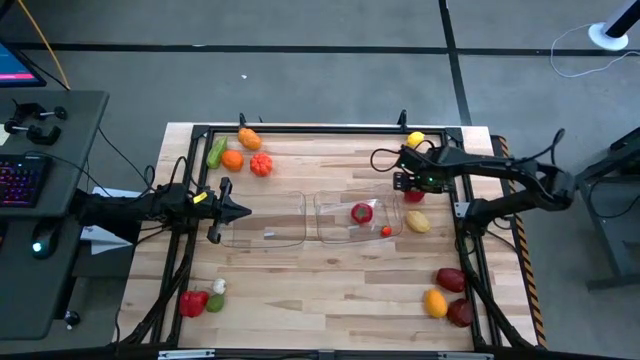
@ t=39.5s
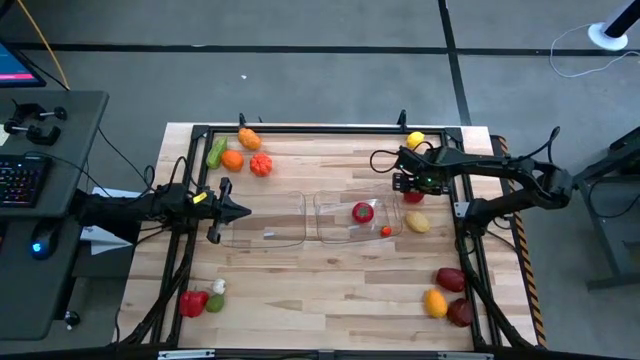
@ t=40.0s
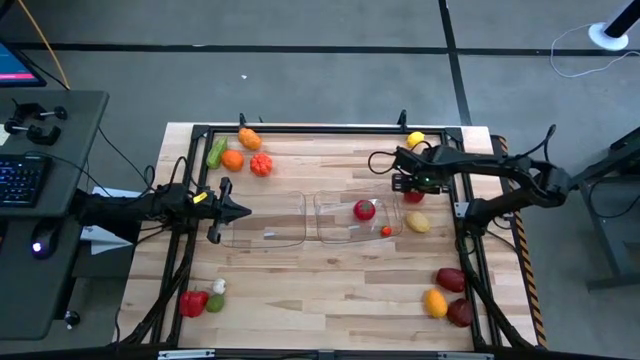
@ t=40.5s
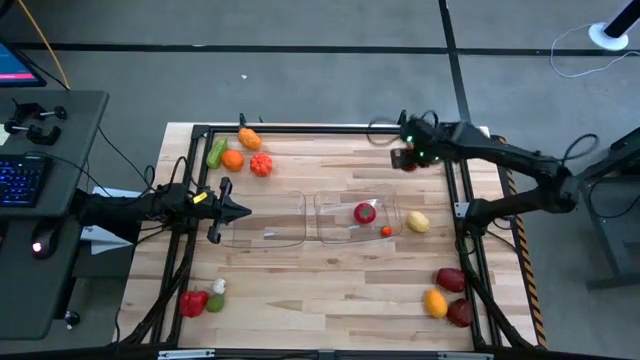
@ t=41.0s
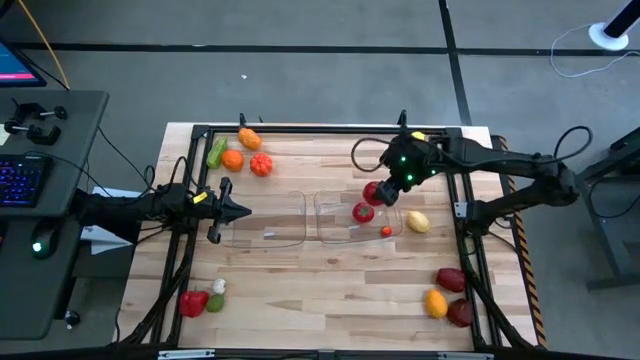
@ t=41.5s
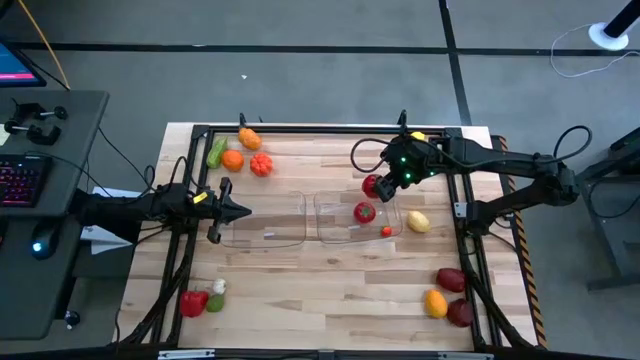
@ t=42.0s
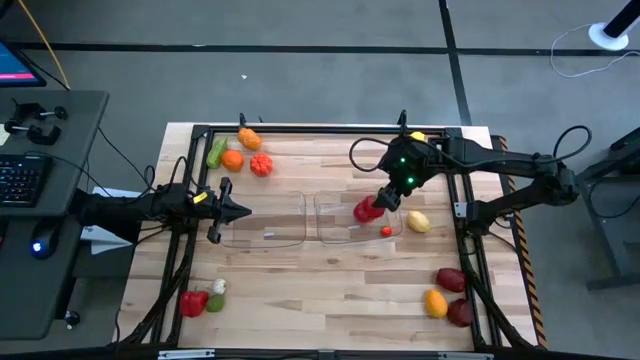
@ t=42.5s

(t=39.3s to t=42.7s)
Task: Sort produce into baskets
Put the red tomato into the right transparent bin

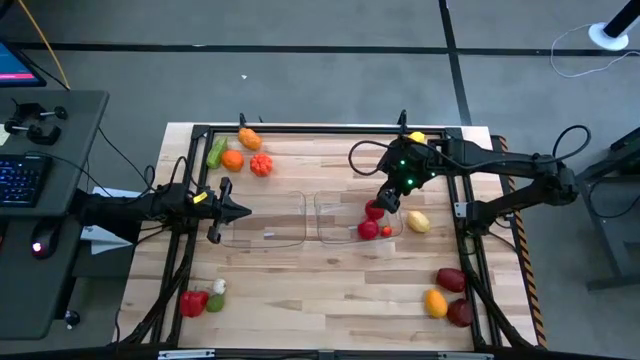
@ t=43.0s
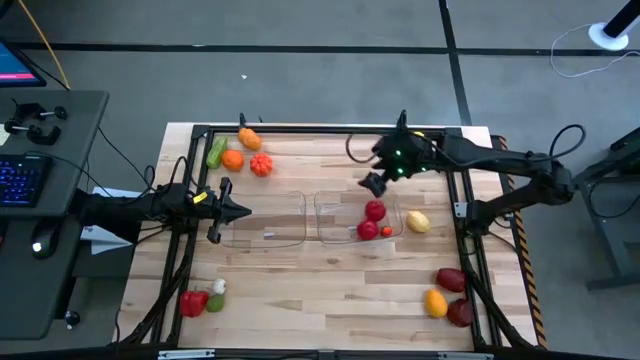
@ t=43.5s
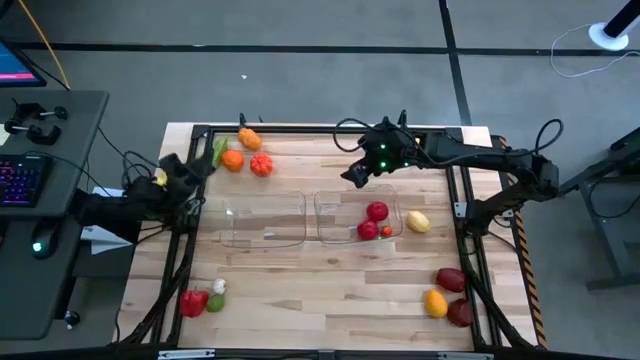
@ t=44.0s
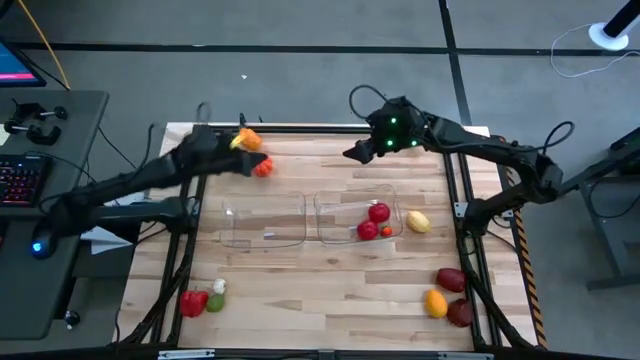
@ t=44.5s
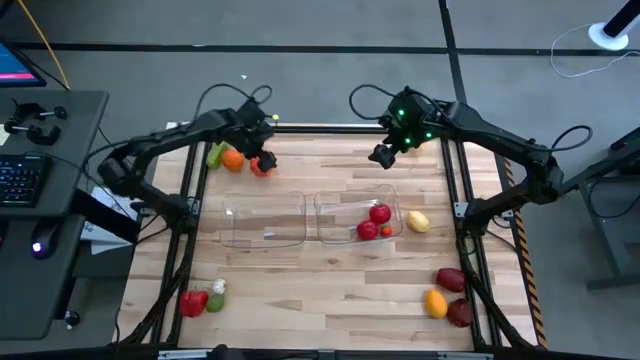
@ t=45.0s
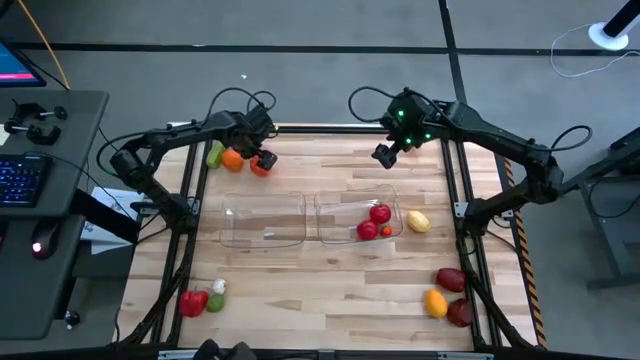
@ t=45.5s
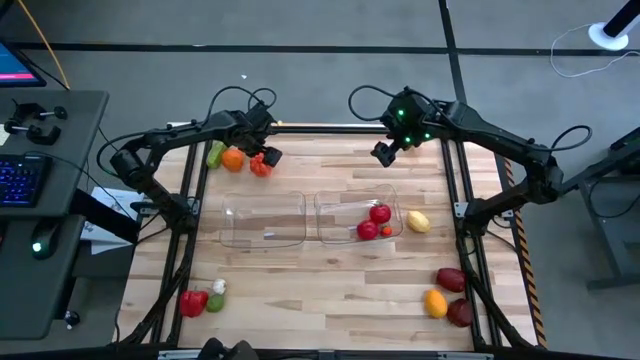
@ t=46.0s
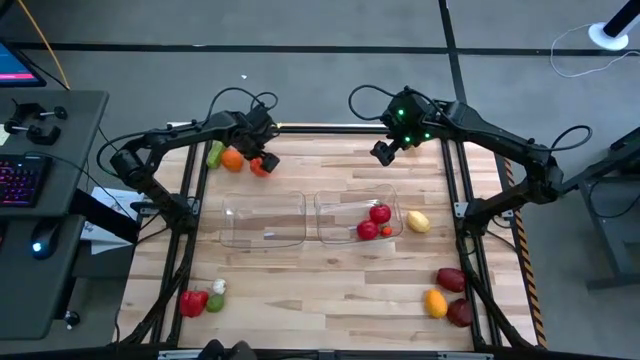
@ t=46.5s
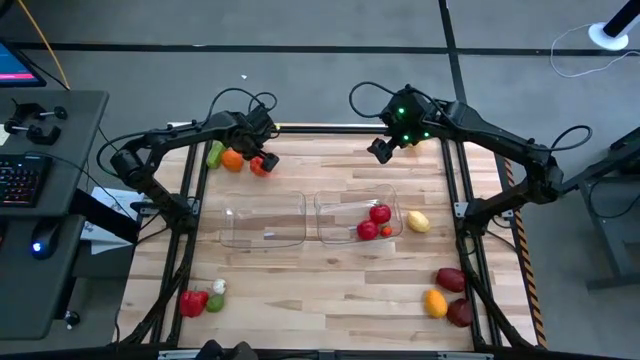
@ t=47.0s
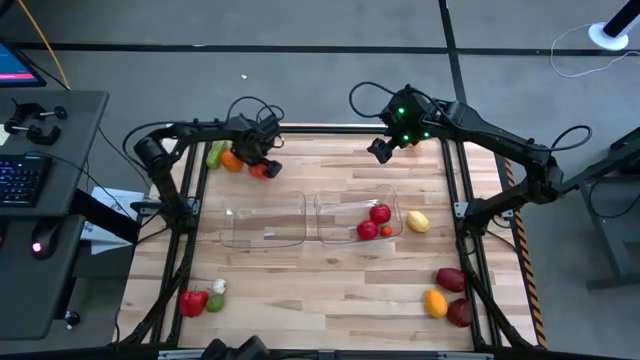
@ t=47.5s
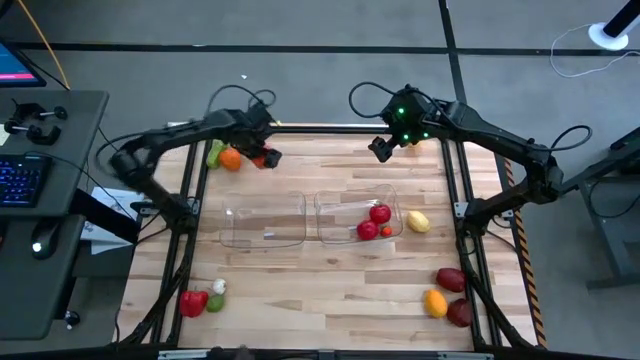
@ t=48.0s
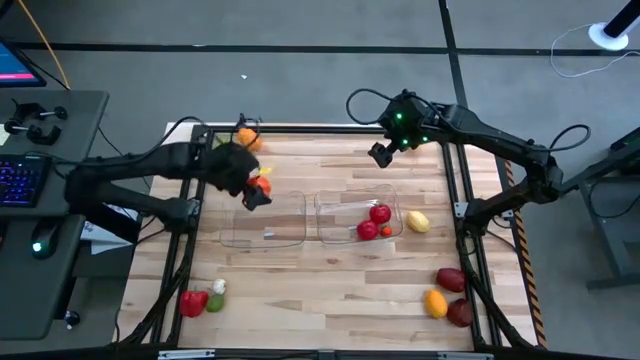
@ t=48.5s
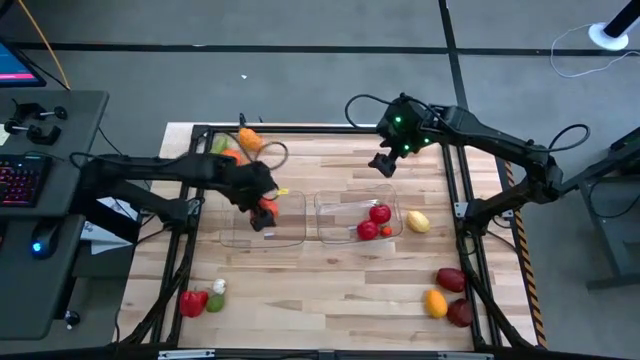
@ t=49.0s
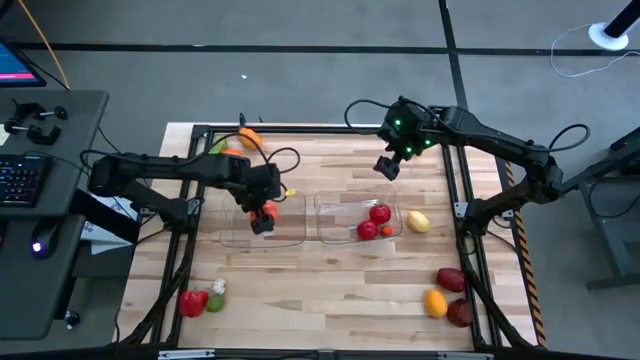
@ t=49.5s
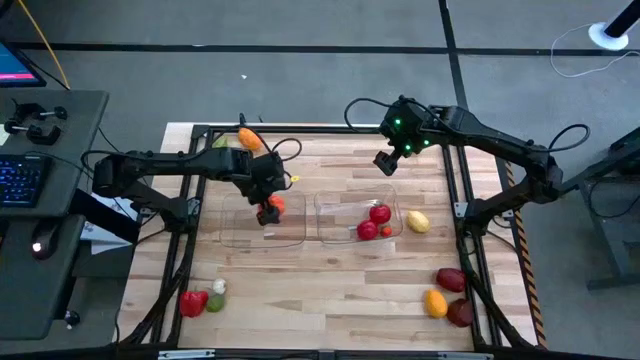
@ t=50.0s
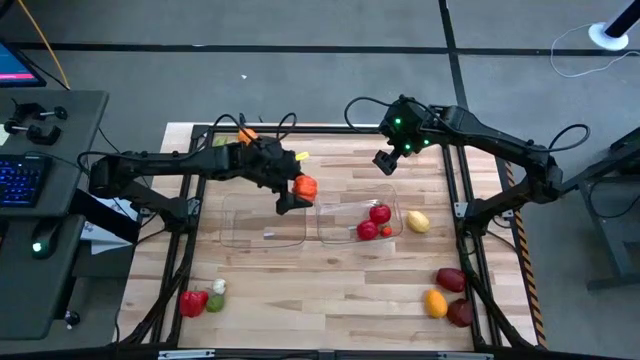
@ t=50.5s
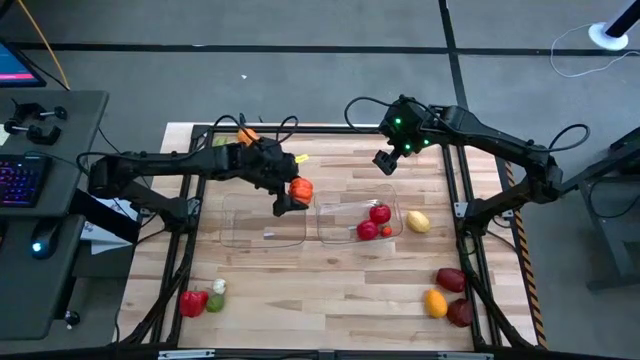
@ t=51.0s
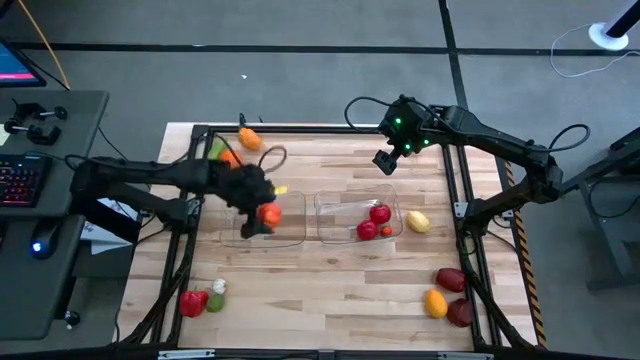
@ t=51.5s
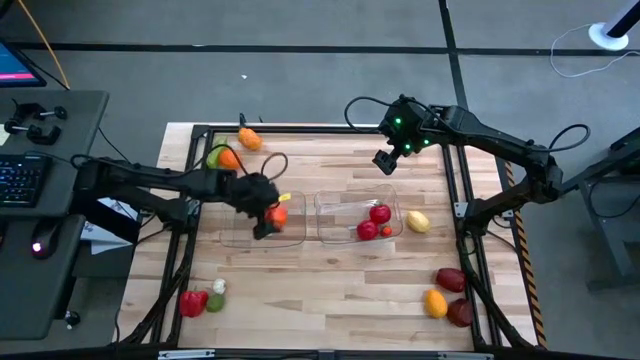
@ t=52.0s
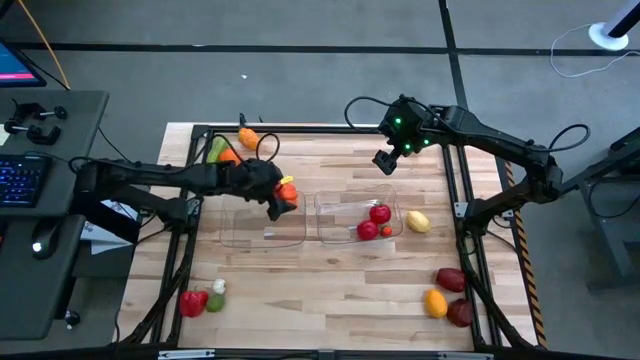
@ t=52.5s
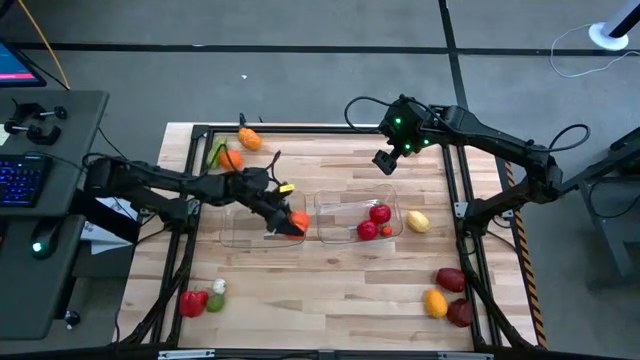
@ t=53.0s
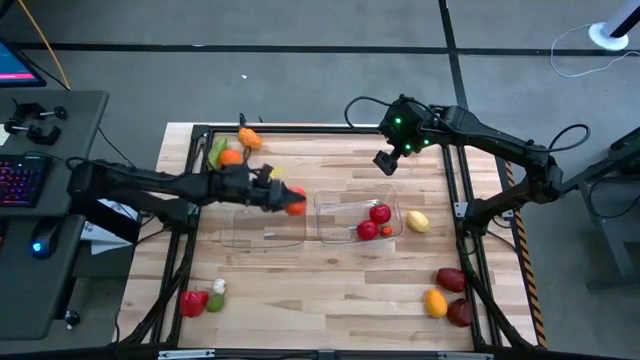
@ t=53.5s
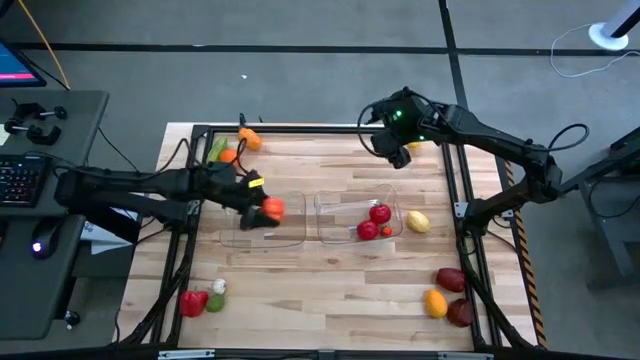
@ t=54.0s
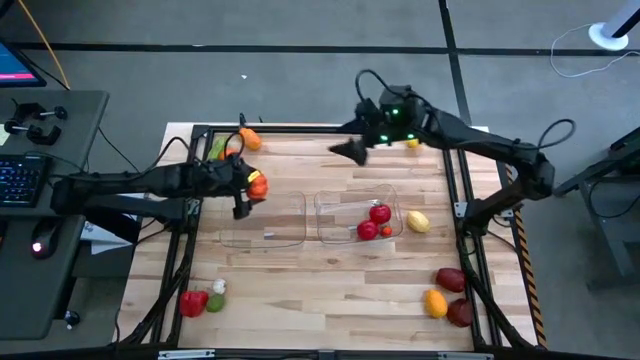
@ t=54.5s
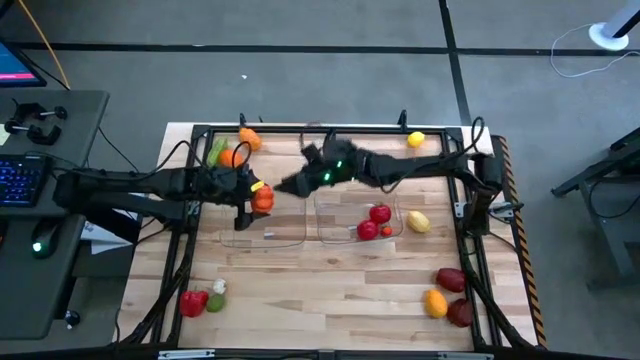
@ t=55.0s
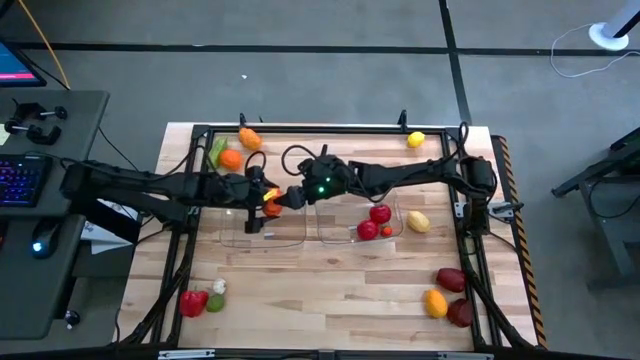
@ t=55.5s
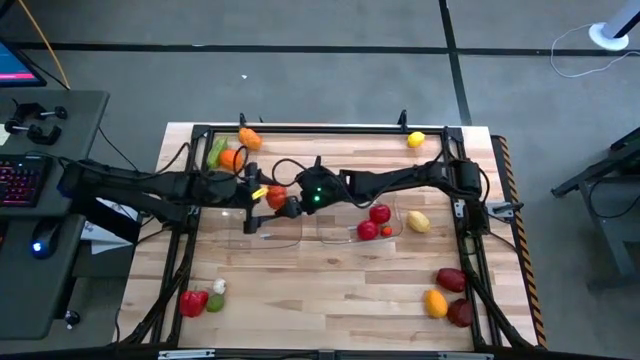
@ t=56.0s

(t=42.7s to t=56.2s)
Put the orange bell pepper into the left transparent bin

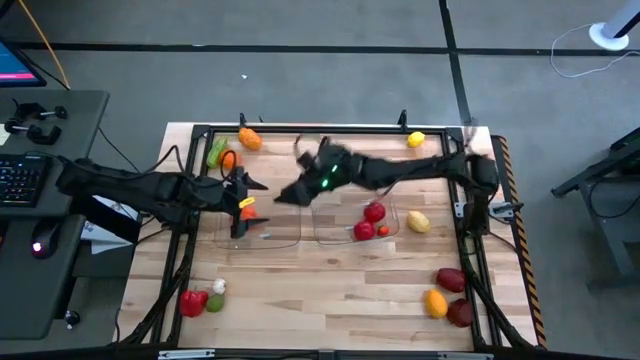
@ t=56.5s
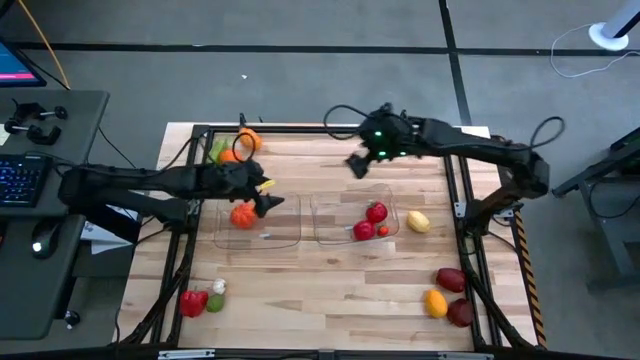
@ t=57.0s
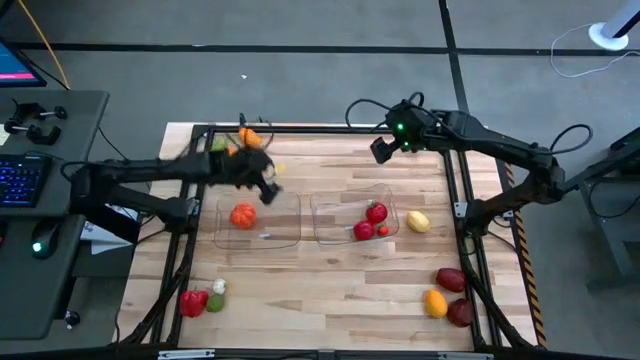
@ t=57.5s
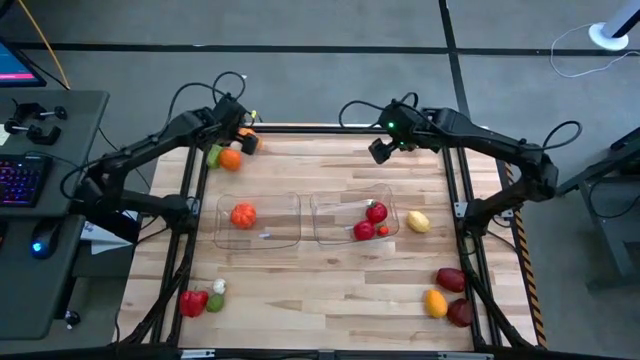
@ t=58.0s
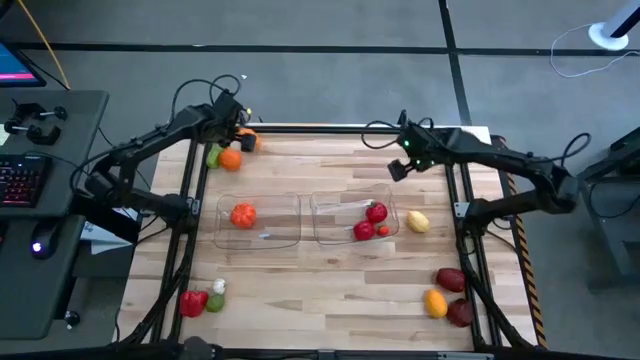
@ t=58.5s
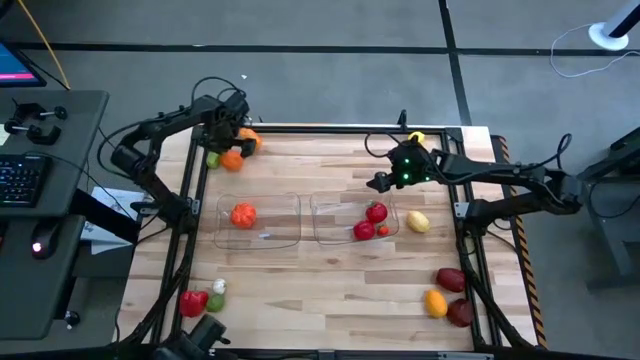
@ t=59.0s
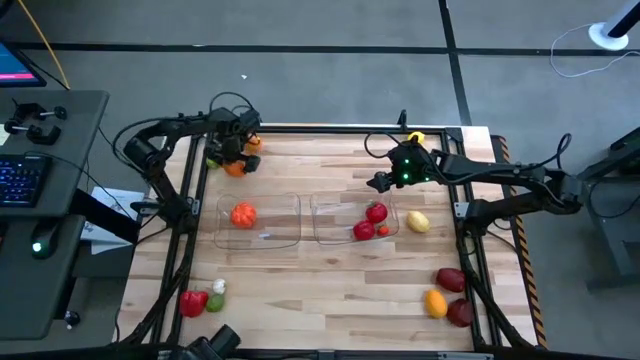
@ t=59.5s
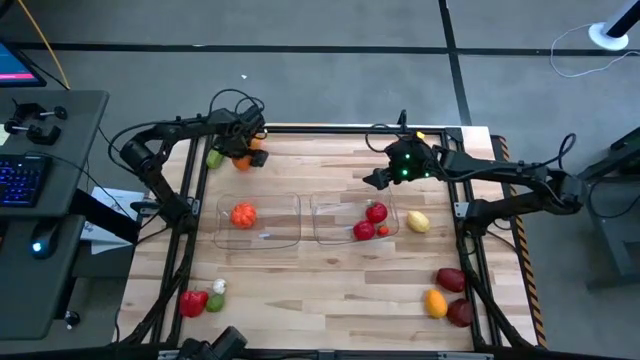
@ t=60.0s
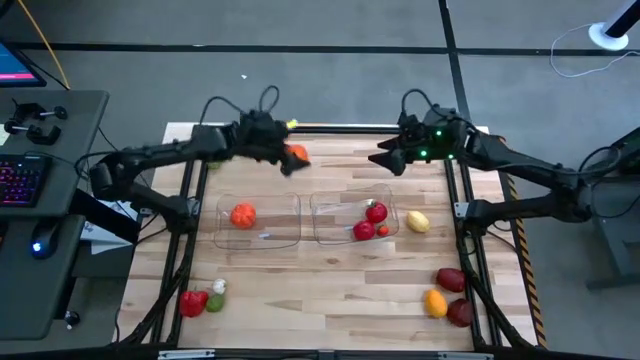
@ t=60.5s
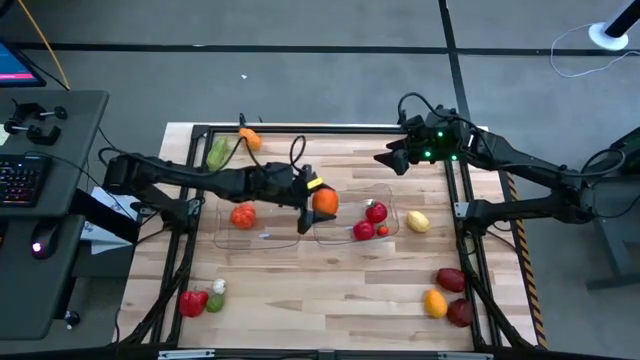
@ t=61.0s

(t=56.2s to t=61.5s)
Put the orange into the right transparent bin
